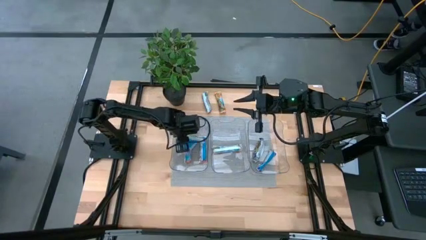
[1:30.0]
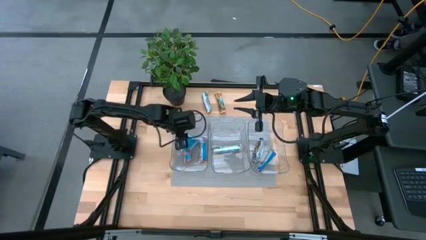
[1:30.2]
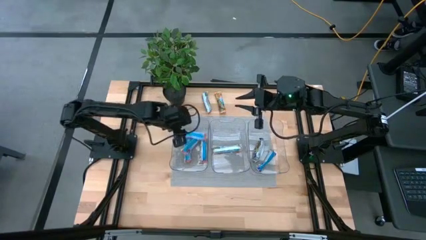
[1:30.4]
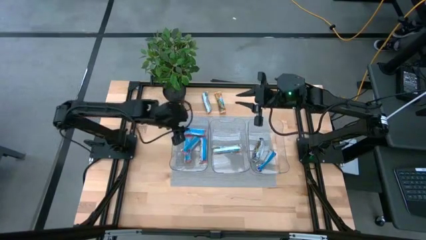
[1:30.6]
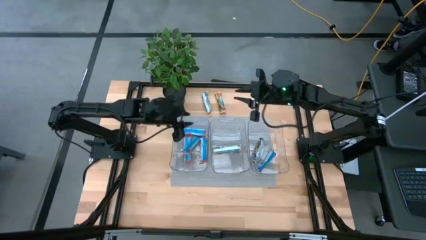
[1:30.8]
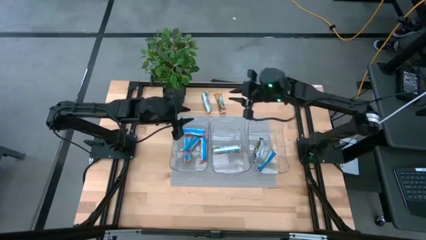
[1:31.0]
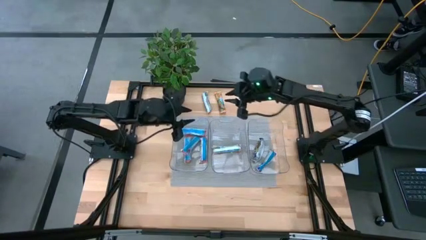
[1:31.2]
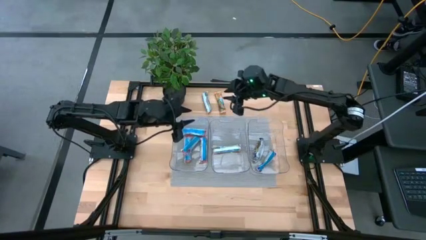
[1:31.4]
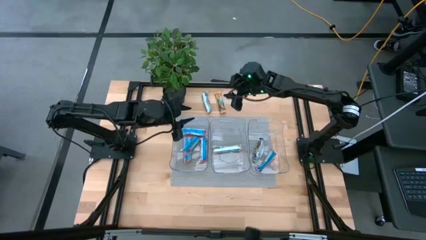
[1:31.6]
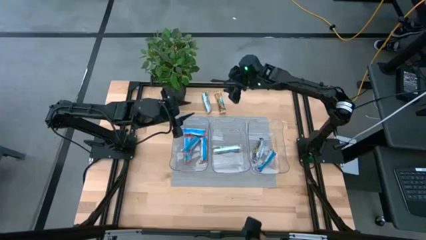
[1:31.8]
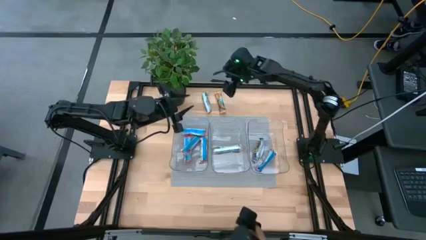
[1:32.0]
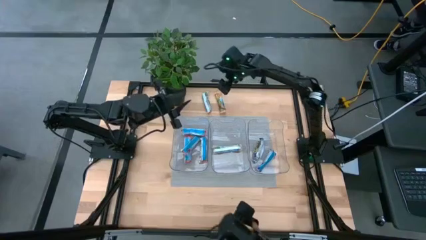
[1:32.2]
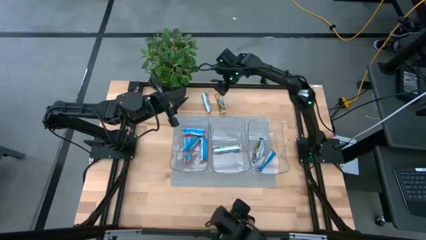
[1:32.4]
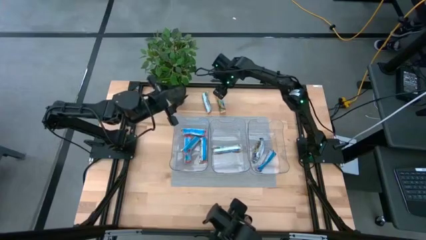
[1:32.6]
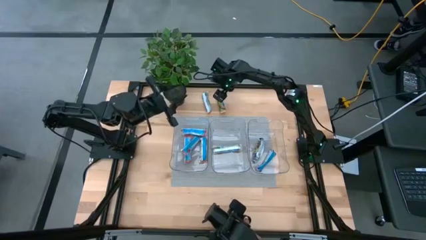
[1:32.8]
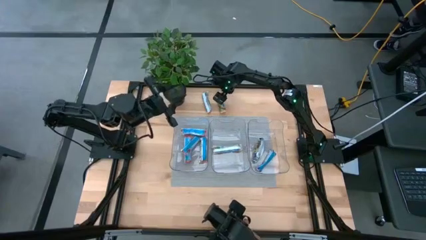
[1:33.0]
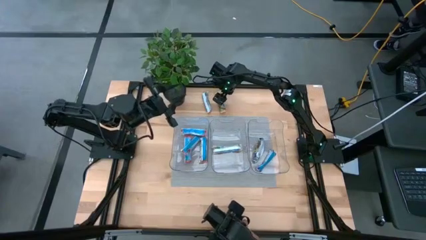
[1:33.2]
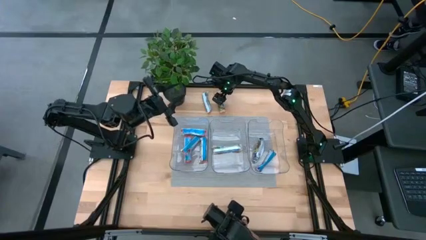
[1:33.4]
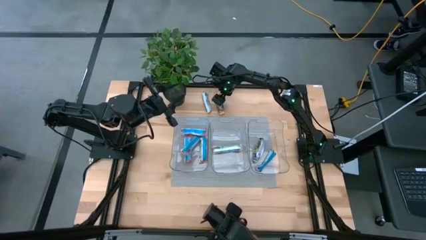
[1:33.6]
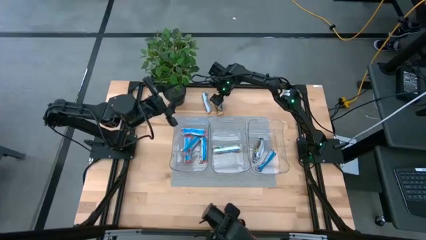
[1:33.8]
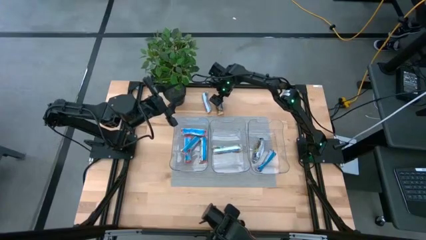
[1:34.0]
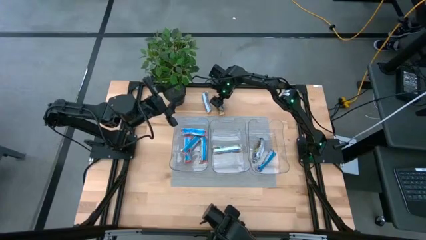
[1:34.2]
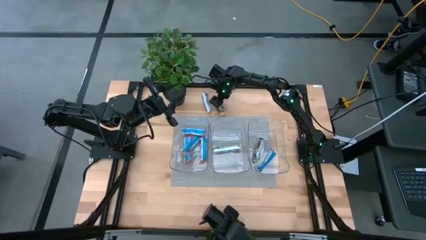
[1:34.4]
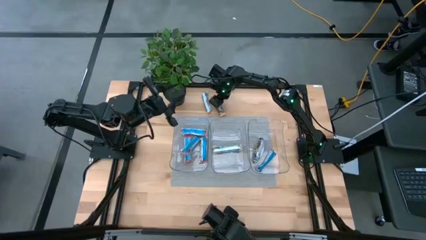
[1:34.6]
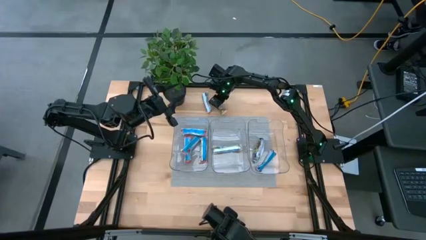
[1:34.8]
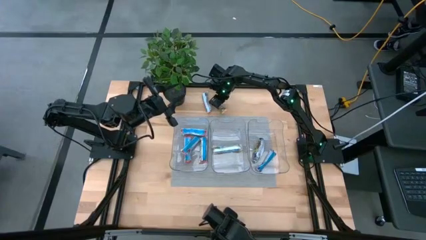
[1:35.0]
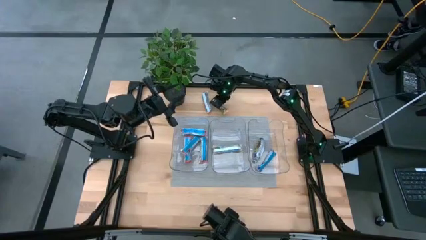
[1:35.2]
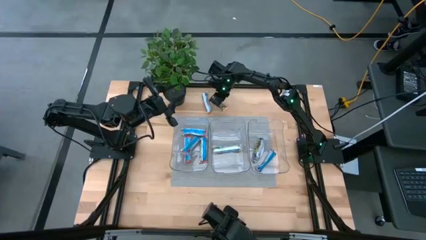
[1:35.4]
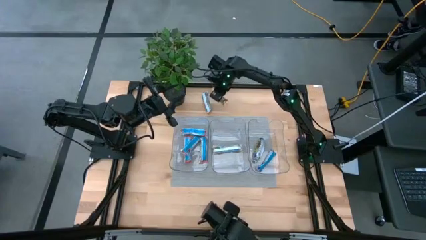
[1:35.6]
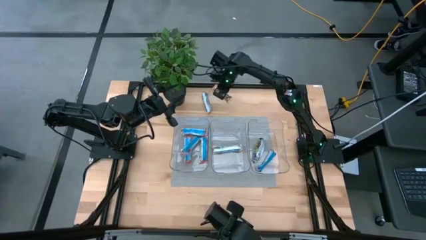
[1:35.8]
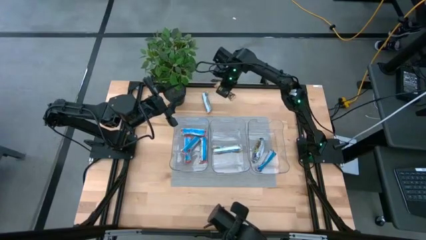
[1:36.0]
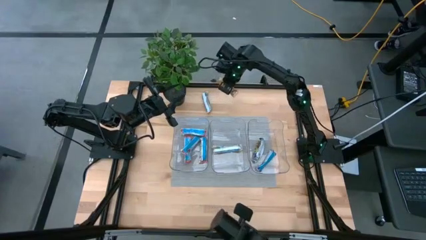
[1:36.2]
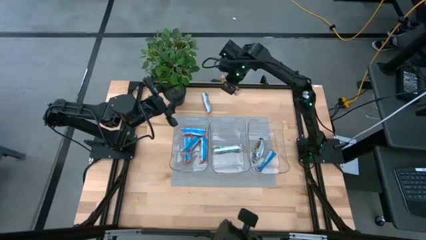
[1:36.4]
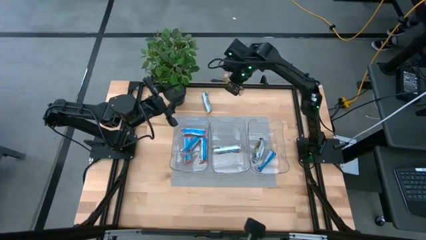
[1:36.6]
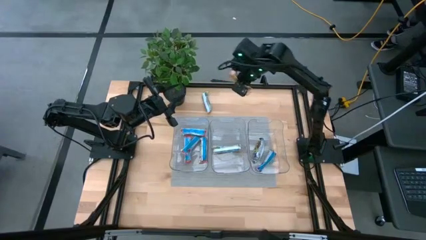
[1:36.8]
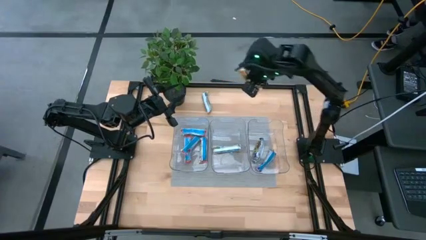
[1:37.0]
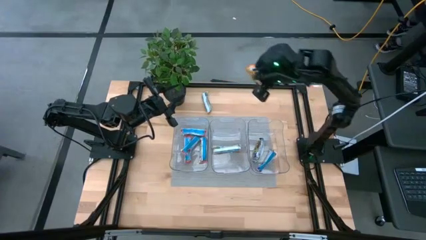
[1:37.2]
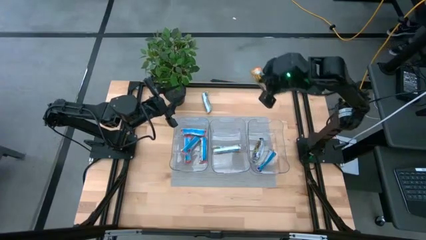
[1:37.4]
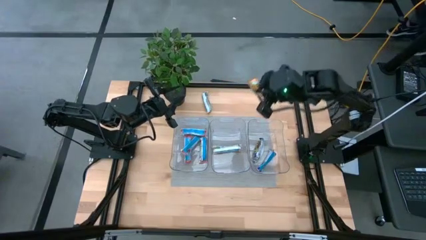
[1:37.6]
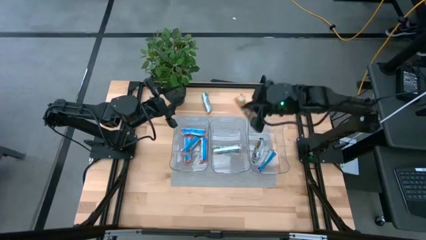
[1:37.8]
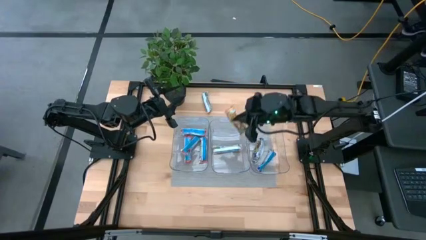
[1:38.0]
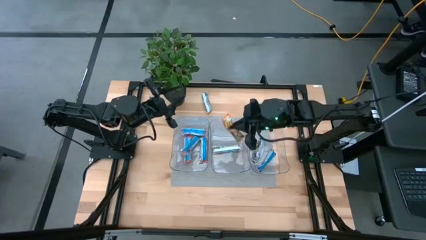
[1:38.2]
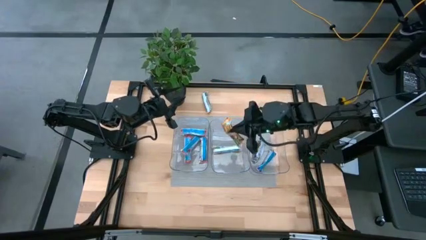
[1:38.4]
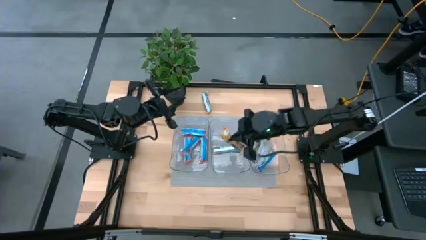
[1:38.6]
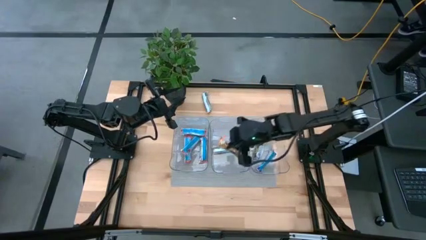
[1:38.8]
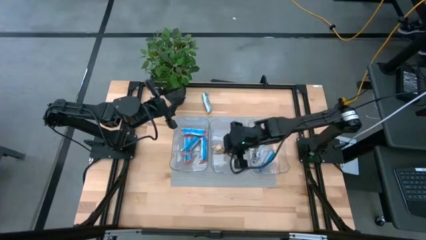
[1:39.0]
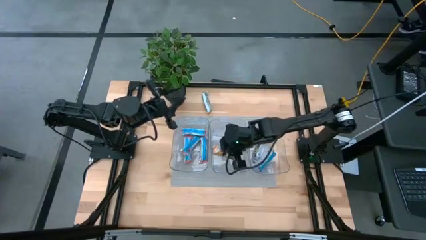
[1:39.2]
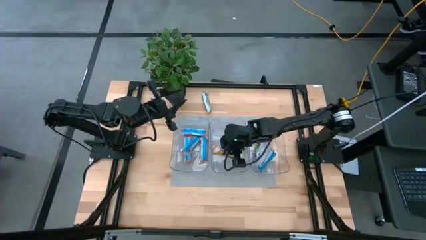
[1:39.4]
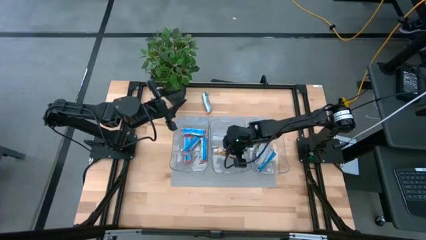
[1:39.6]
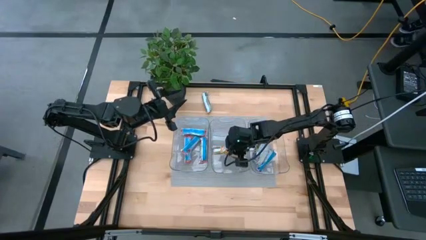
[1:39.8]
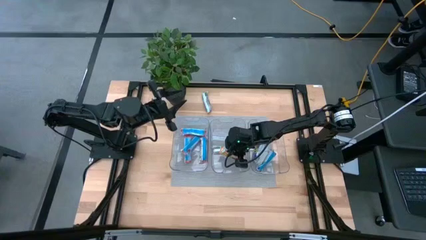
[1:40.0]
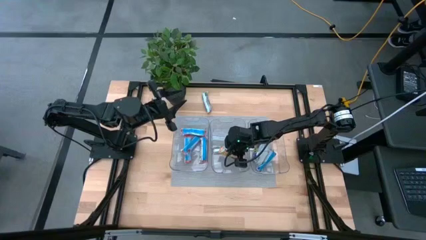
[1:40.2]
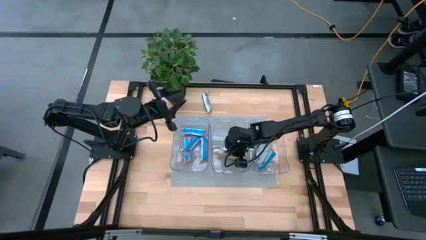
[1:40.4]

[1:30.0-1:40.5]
Task: Pick and place Granola Bars by type
Put the yellow granola bar into the middle transparent bin

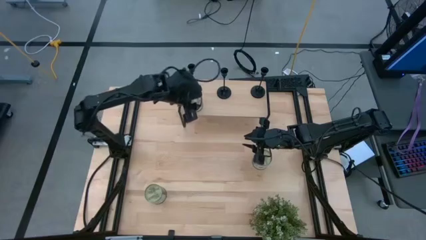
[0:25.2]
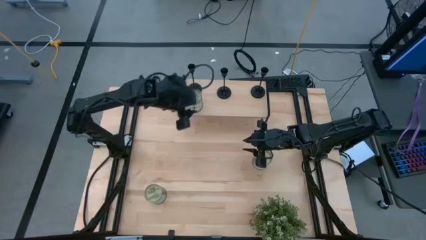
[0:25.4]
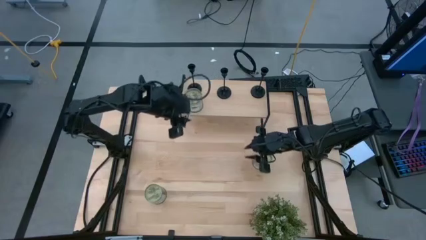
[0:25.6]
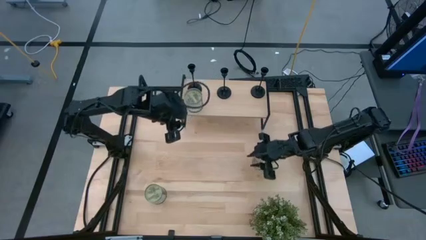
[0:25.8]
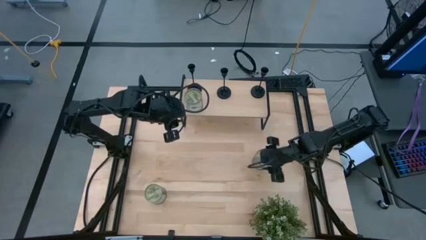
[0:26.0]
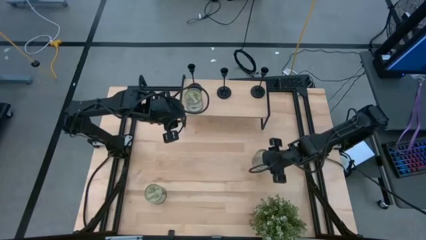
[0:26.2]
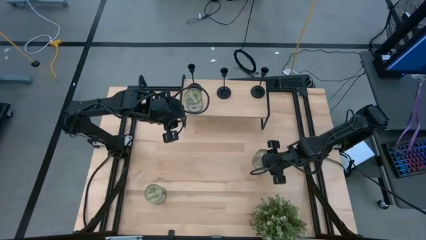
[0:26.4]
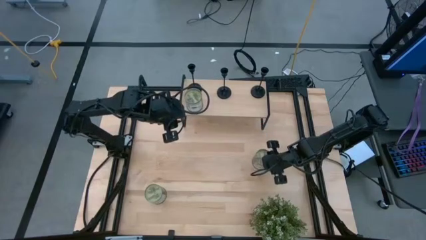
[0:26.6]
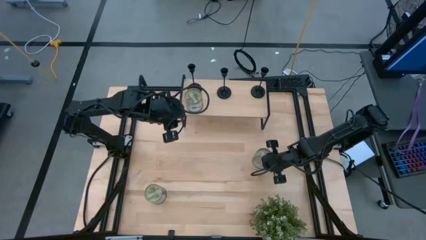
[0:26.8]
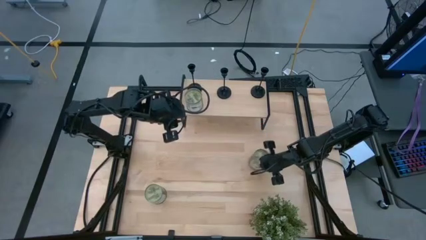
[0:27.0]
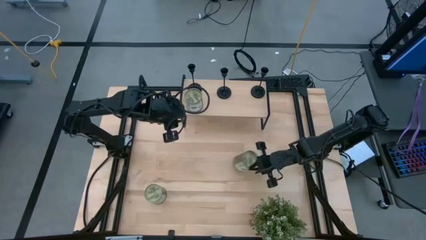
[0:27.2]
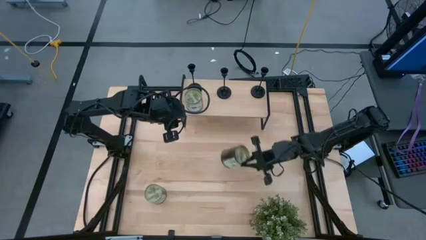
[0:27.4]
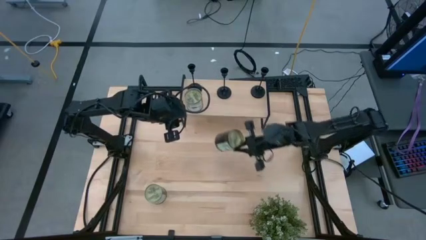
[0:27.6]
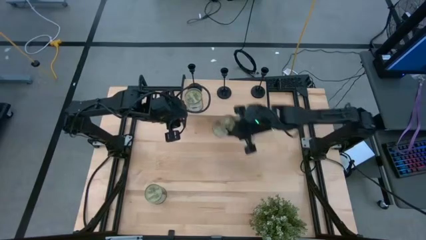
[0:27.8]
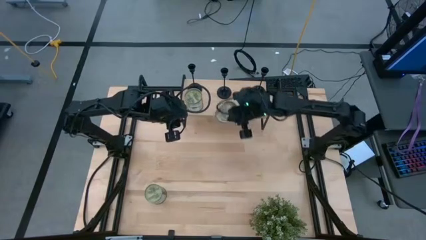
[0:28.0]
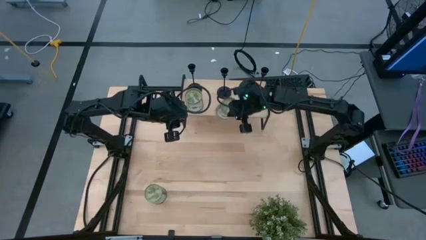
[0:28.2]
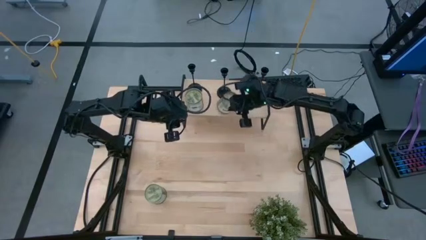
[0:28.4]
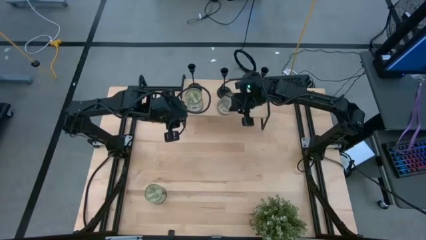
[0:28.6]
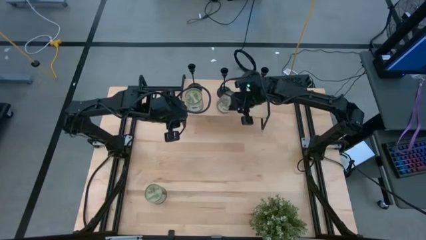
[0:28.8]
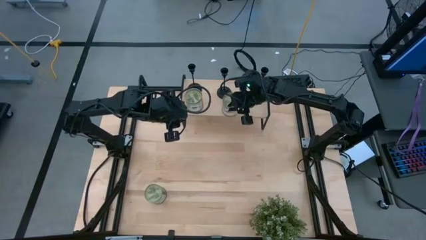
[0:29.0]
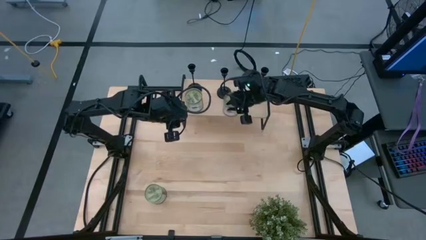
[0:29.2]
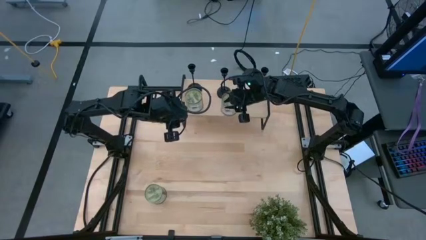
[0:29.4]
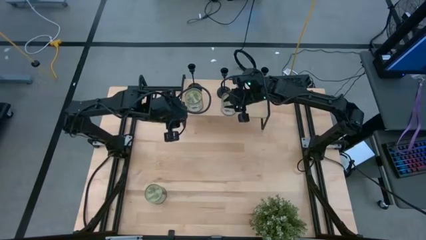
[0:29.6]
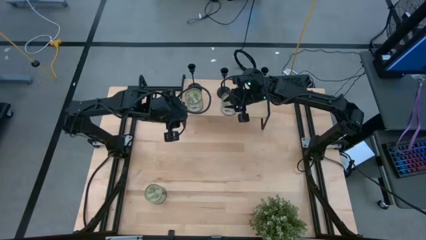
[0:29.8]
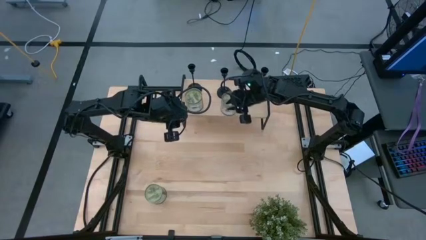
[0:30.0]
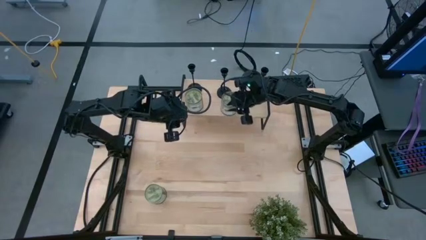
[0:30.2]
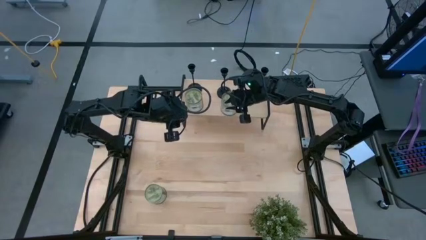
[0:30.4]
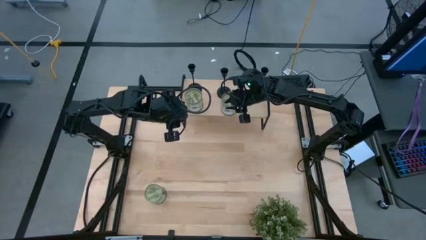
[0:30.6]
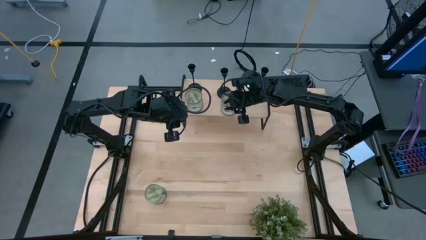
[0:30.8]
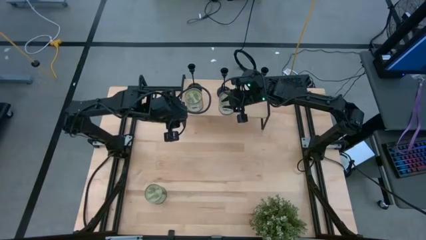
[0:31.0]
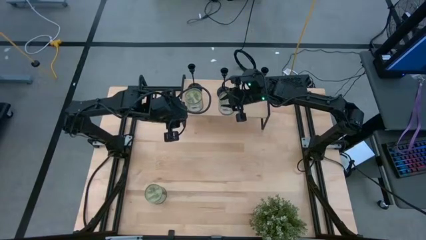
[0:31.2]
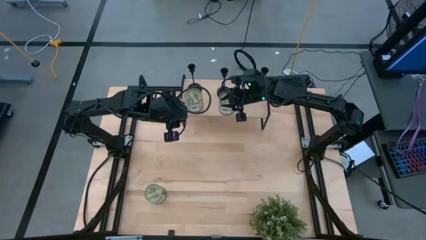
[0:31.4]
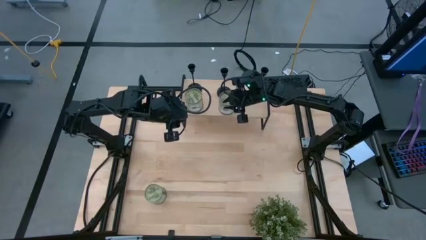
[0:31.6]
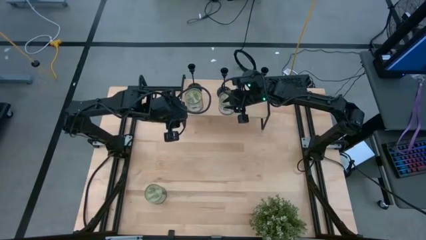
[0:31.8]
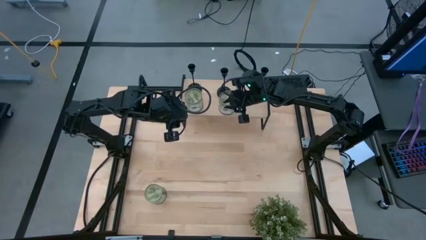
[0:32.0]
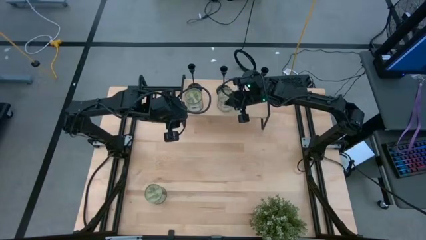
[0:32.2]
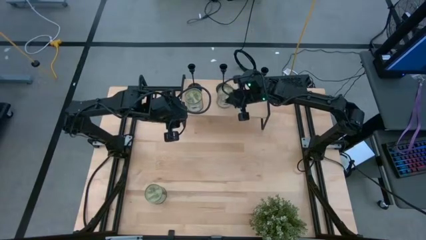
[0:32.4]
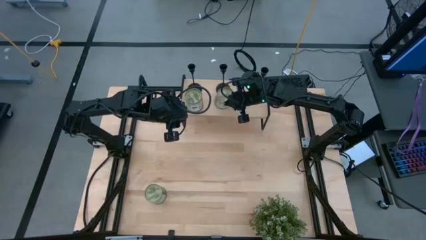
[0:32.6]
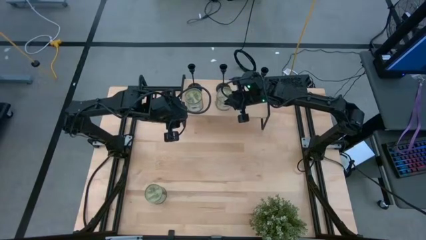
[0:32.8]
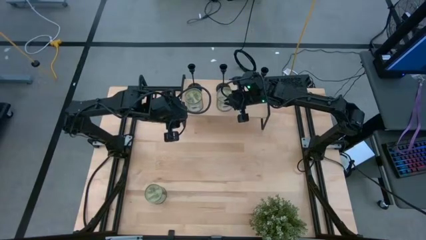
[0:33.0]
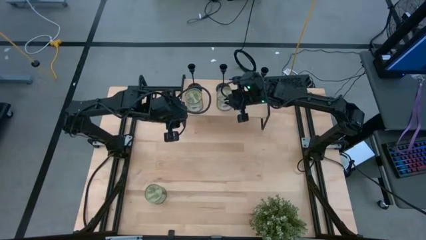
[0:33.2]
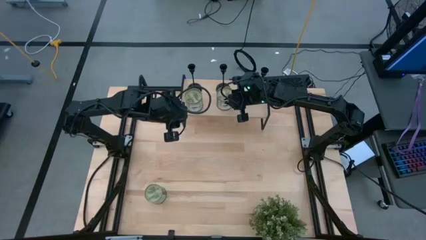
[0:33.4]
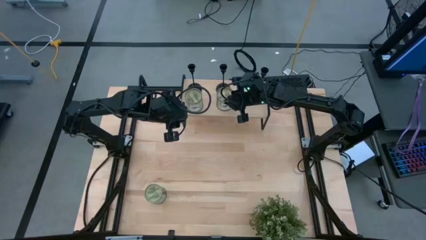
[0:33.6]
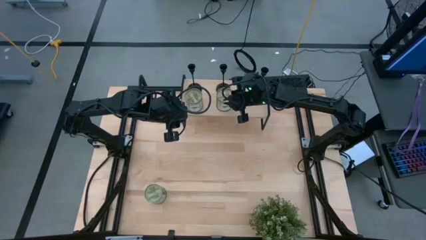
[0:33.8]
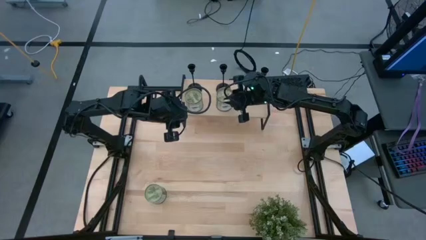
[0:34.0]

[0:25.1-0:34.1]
Task: Pick & Place candle stick holders
Put the right scented candle on the shelf
